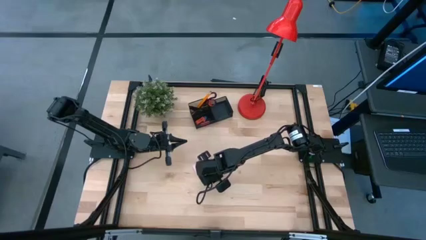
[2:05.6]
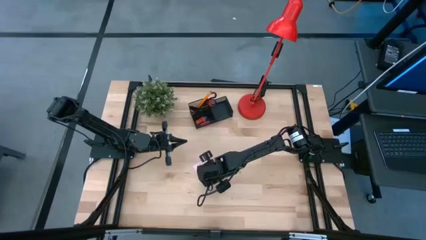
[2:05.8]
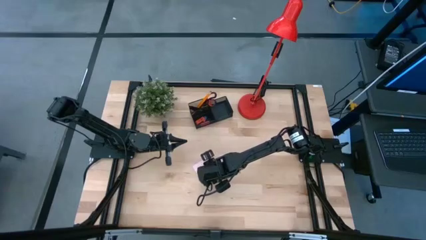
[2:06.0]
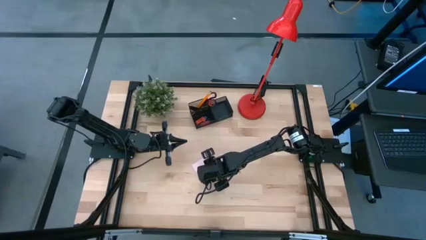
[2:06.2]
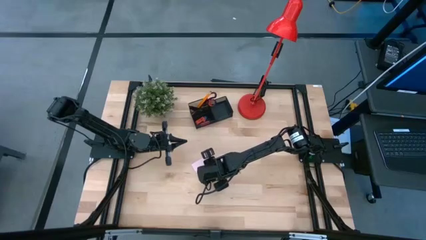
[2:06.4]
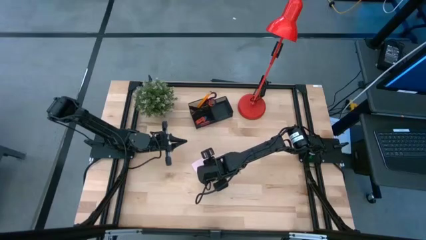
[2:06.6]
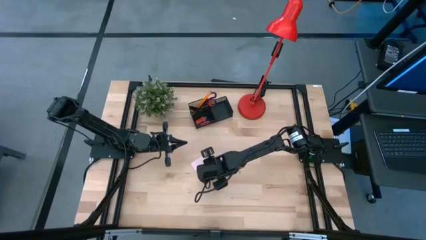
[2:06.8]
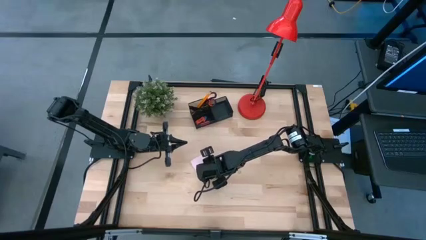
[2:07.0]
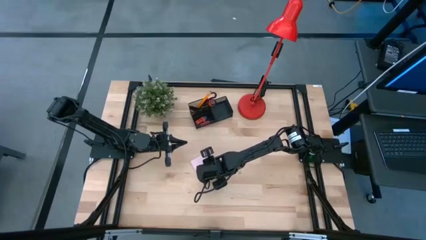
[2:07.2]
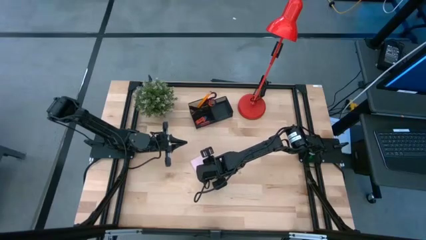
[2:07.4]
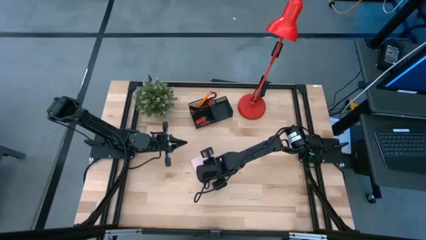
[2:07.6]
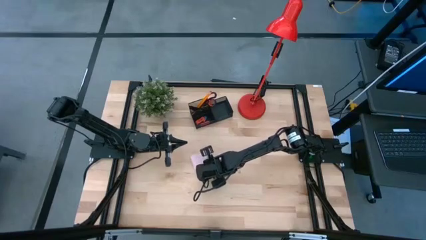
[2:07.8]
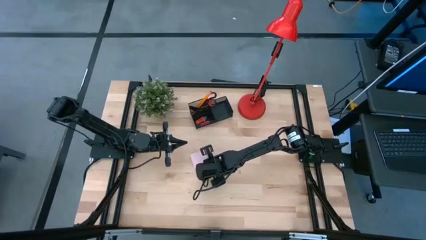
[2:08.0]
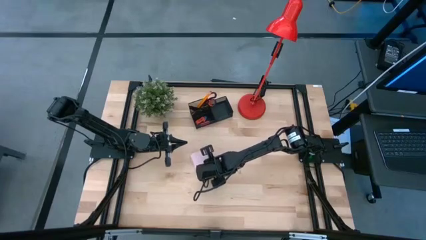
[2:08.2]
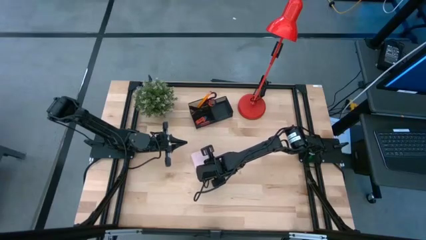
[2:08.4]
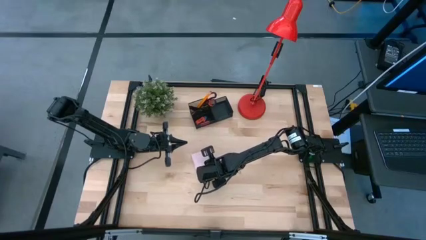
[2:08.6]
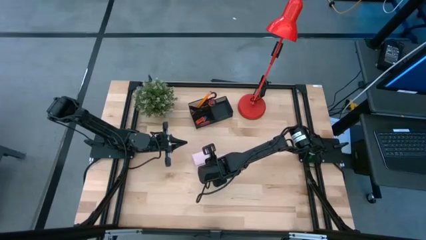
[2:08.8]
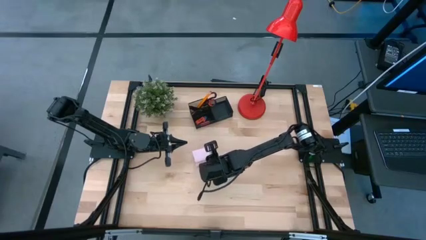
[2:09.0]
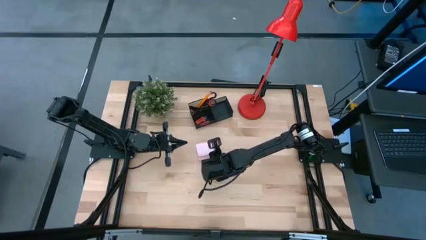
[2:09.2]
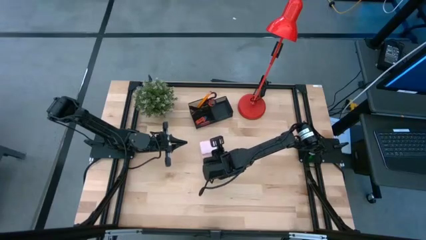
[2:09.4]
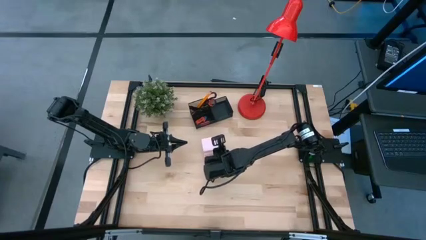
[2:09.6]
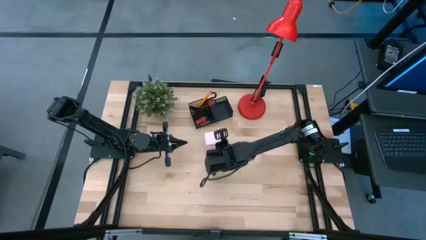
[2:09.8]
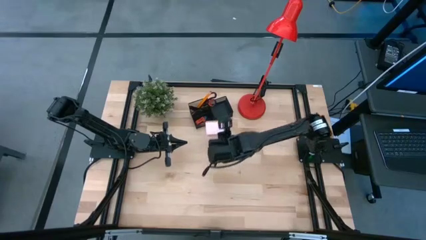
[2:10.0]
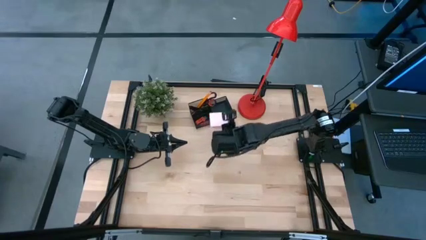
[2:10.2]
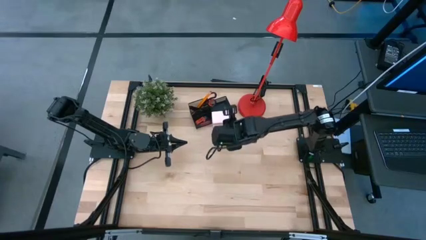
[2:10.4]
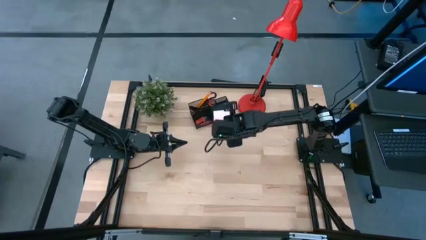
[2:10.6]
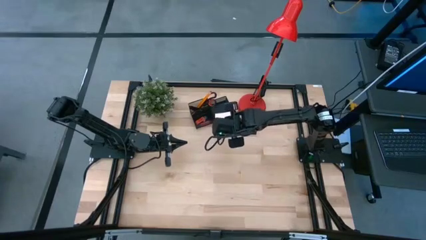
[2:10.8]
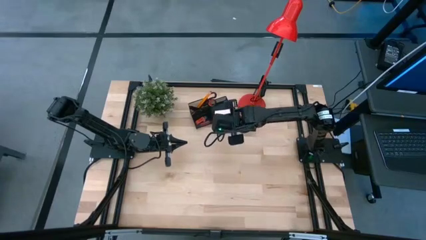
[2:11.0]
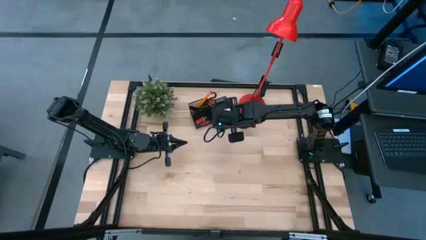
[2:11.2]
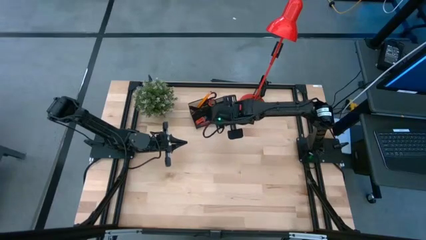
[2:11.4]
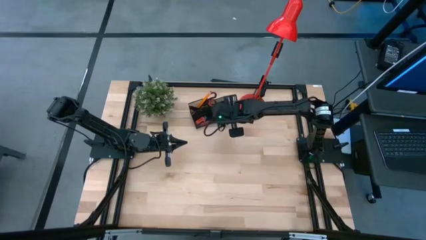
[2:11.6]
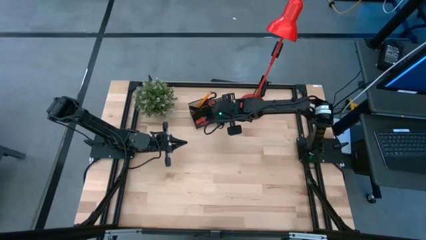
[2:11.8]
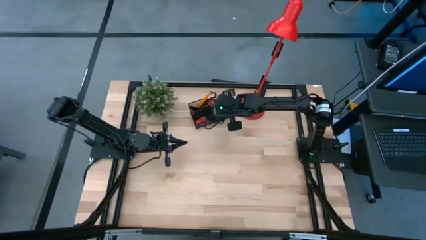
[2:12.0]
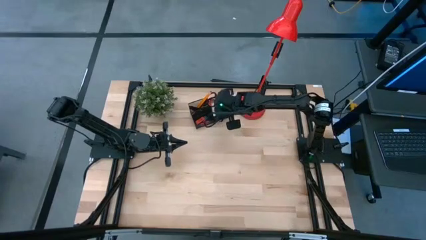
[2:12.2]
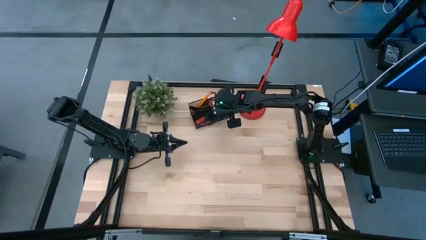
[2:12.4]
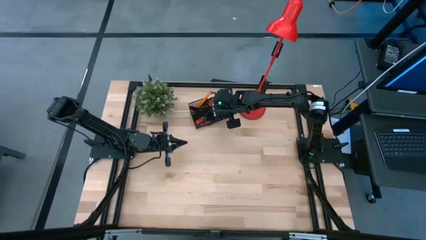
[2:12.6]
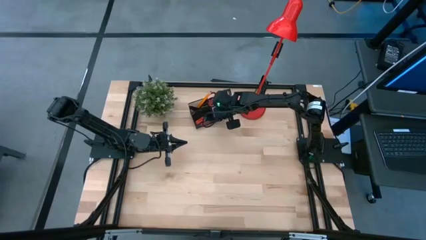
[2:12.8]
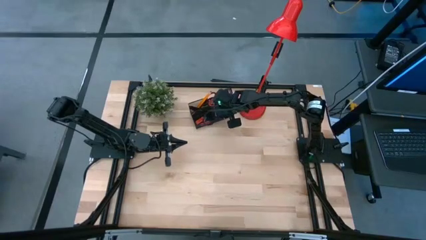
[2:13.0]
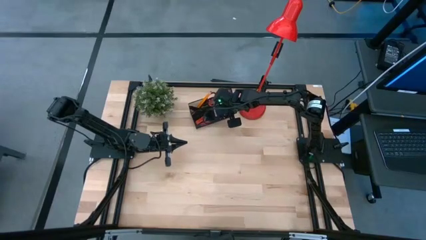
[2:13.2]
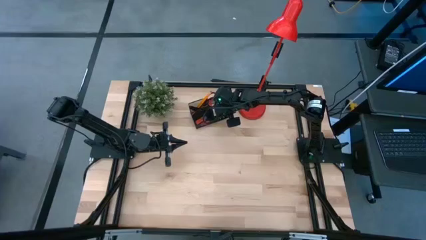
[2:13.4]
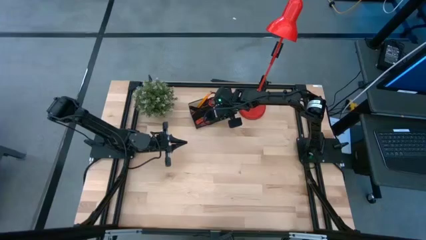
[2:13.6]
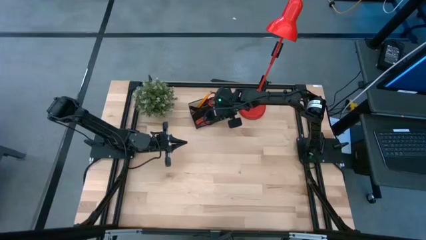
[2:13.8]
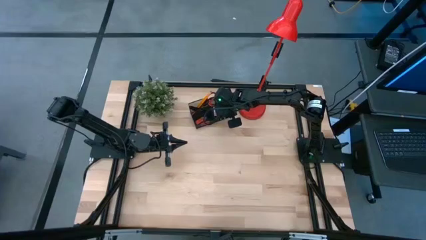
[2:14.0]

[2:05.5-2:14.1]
Task: Pick and place office supplies into organizer
Put the pink sticky notes into the black desk organizer

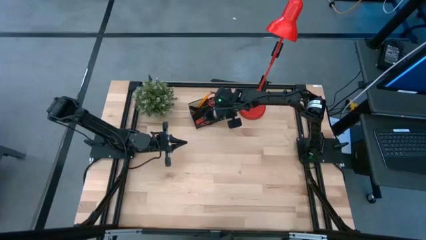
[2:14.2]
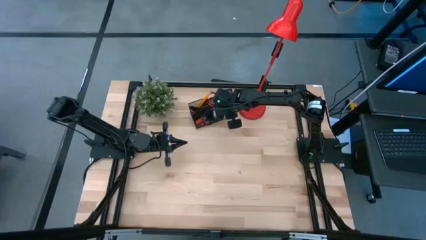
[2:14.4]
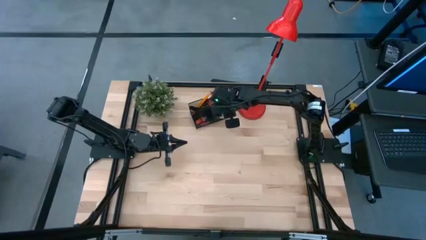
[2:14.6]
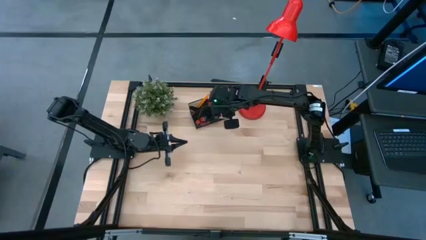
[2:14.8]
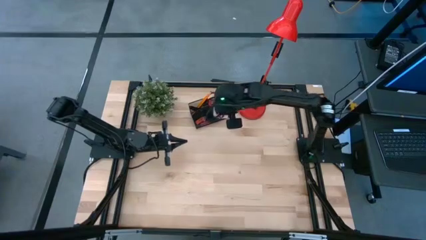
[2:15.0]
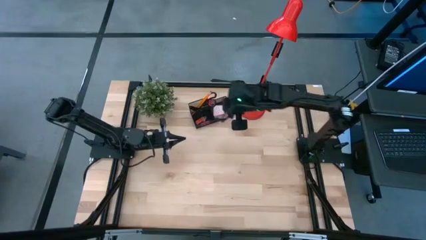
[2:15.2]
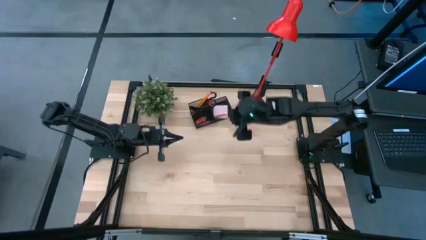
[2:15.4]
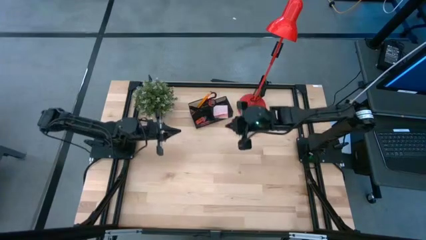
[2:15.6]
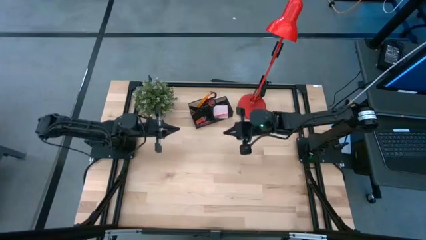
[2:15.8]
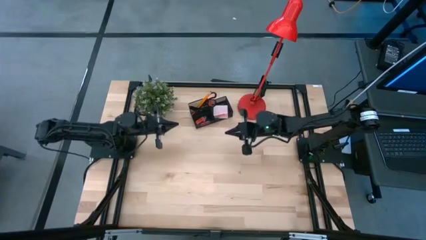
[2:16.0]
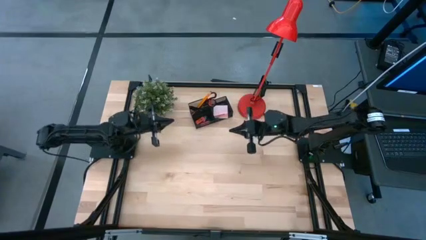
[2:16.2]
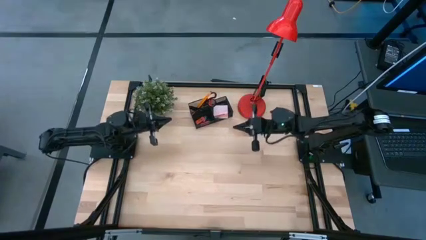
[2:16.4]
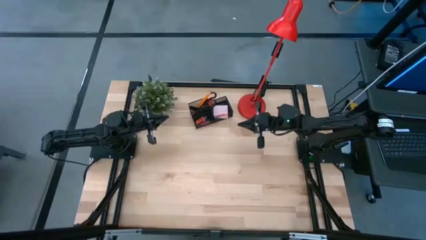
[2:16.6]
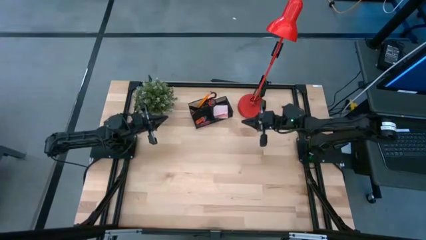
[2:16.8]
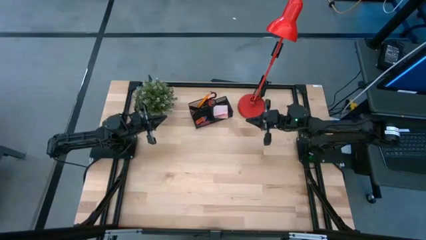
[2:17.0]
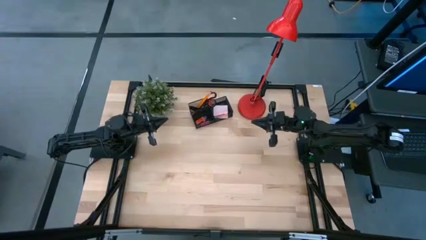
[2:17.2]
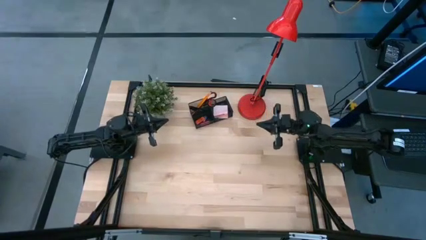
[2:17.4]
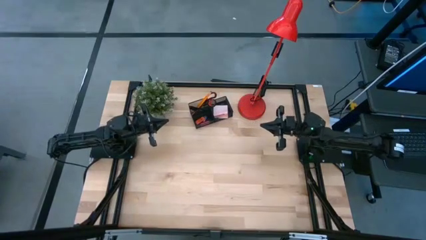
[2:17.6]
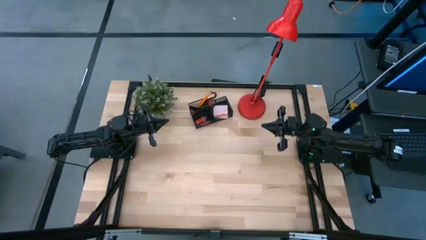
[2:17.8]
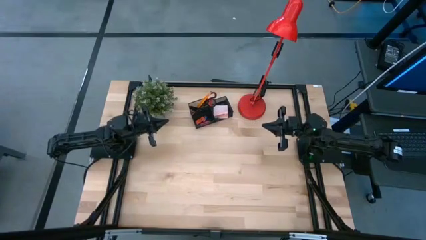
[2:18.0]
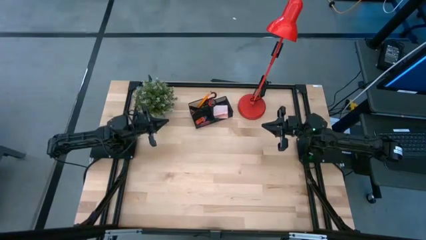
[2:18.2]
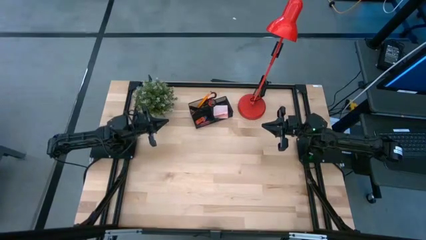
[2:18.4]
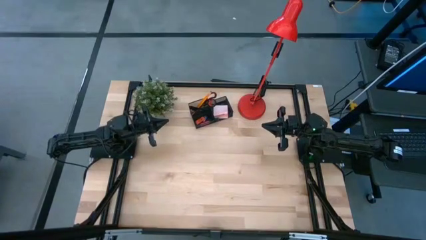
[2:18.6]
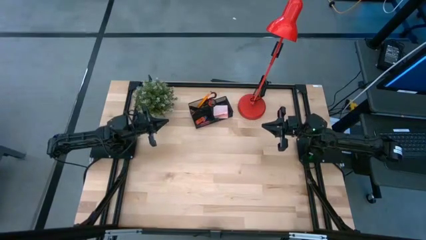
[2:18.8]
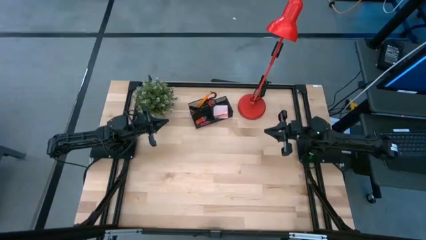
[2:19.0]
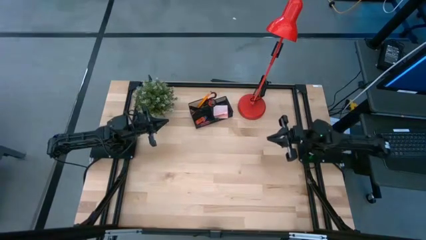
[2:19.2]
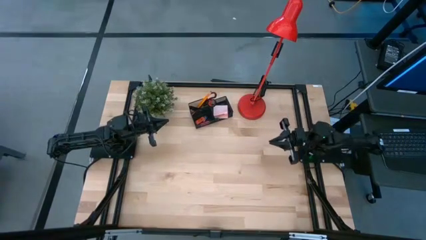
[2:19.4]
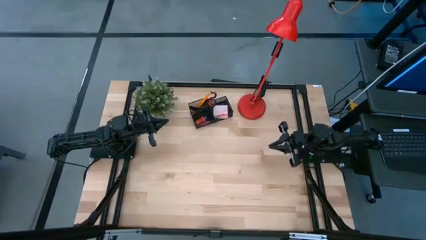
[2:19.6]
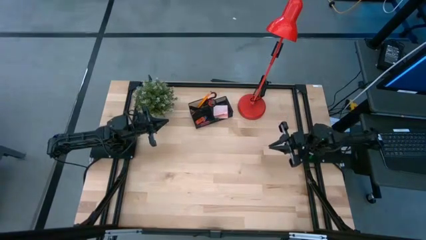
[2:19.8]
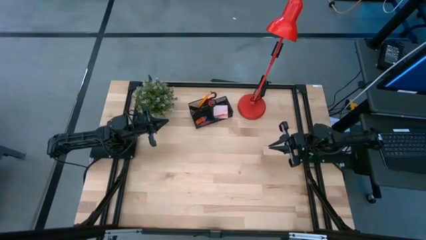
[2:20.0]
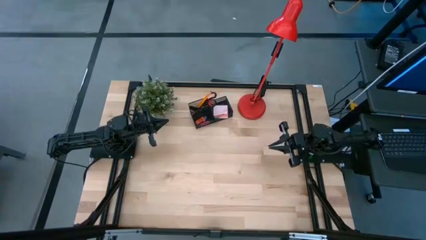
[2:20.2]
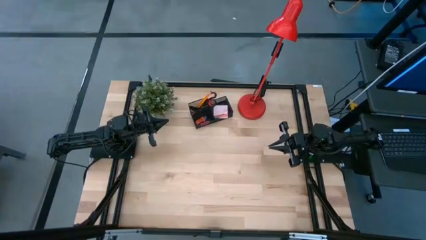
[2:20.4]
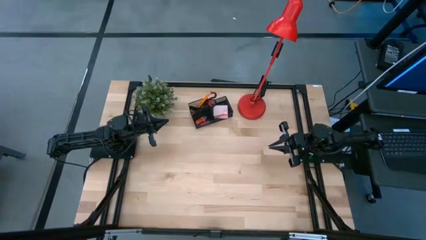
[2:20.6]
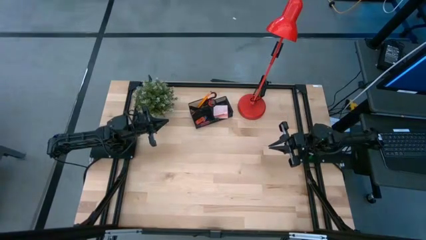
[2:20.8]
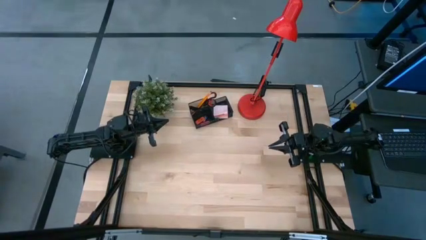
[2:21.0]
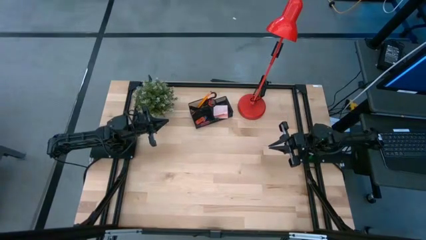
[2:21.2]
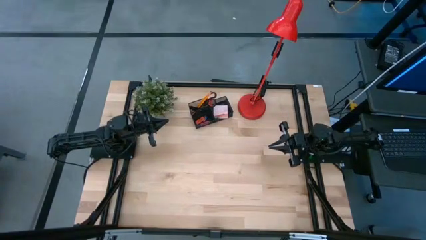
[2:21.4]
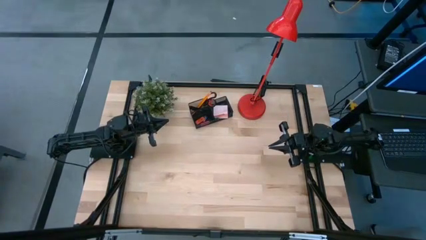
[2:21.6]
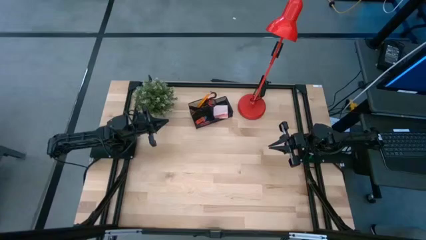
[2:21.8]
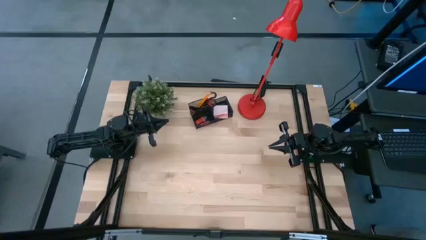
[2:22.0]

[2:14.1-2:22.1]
Return to Home Position
